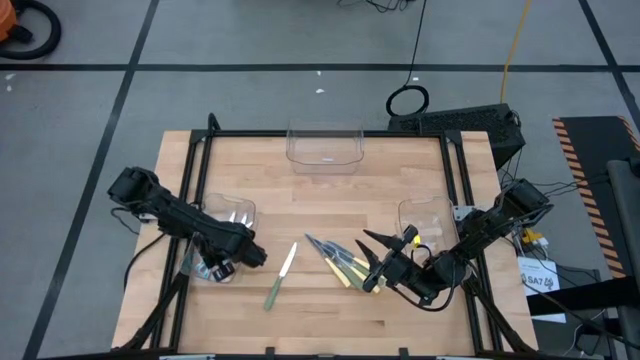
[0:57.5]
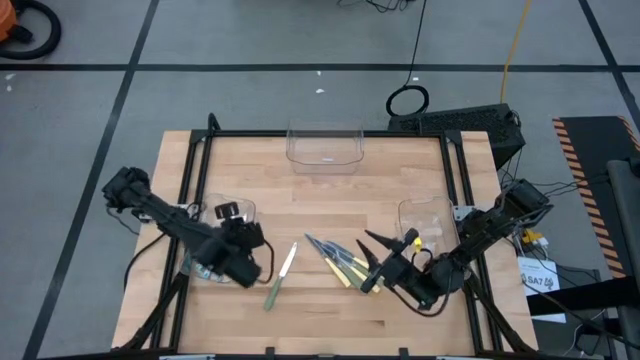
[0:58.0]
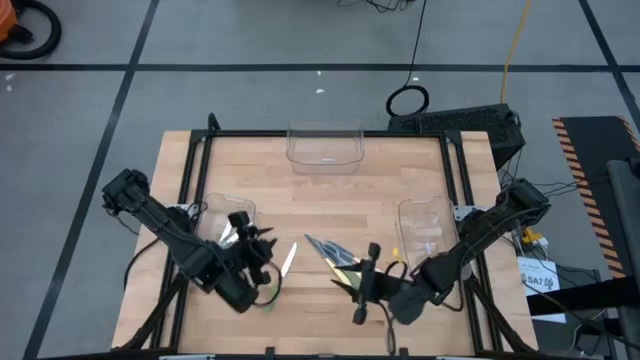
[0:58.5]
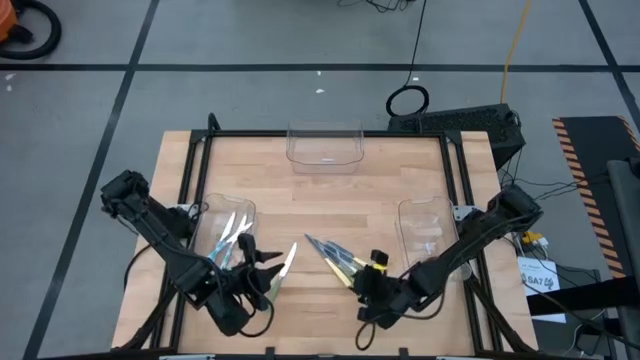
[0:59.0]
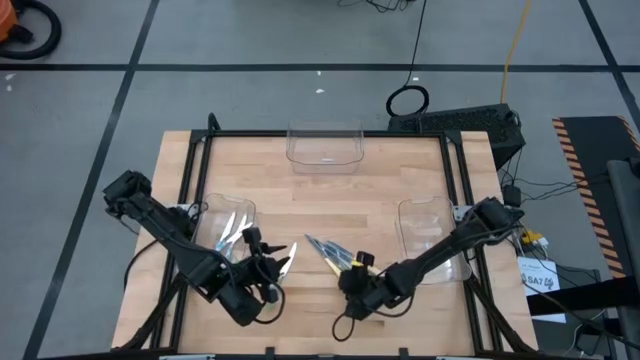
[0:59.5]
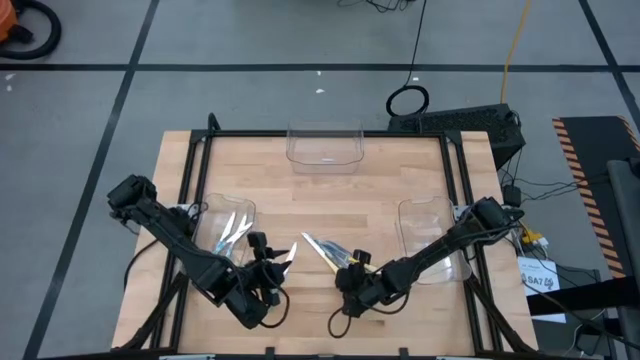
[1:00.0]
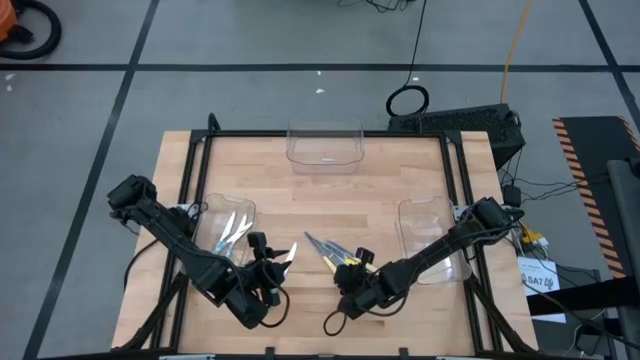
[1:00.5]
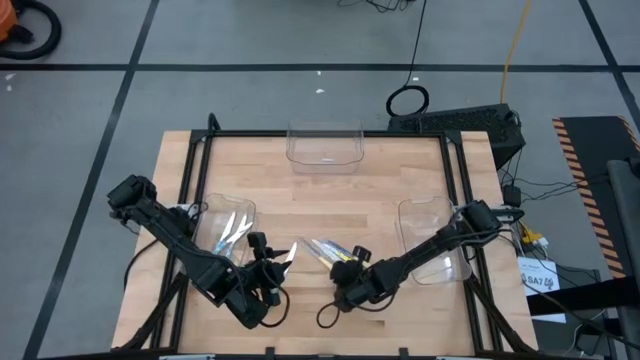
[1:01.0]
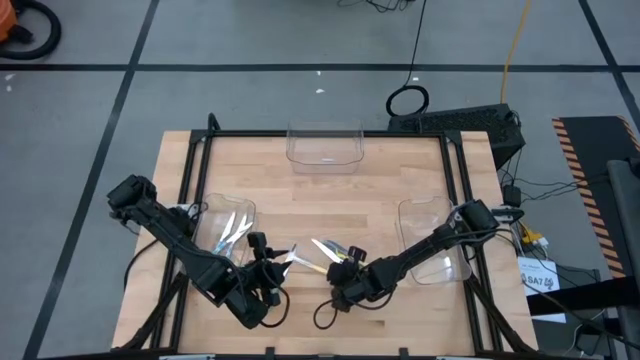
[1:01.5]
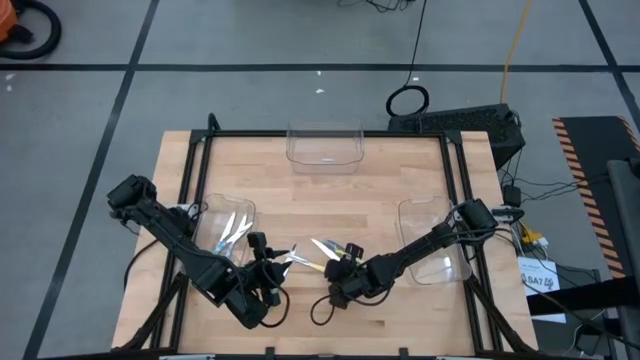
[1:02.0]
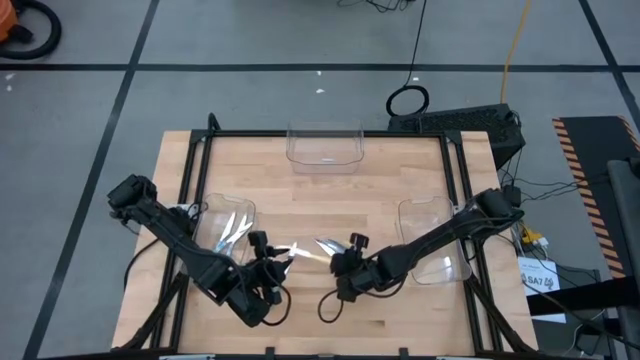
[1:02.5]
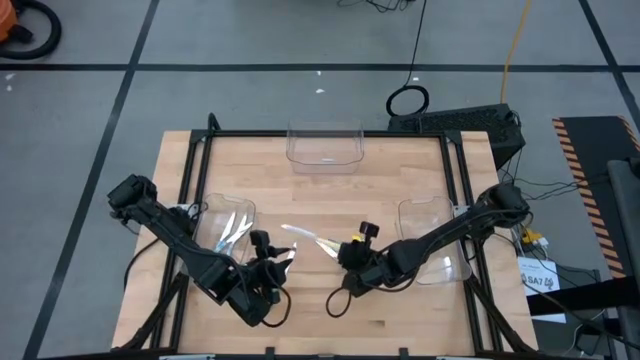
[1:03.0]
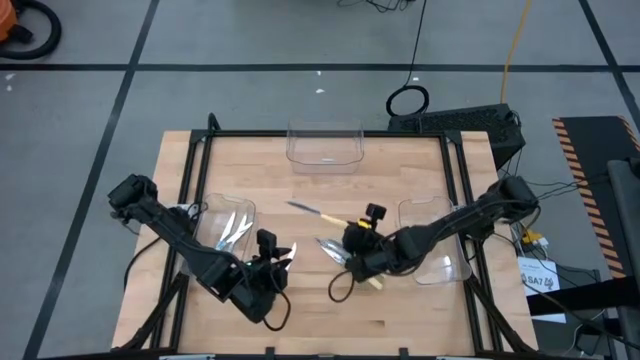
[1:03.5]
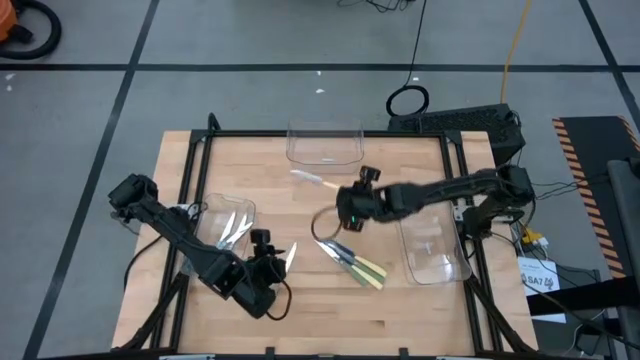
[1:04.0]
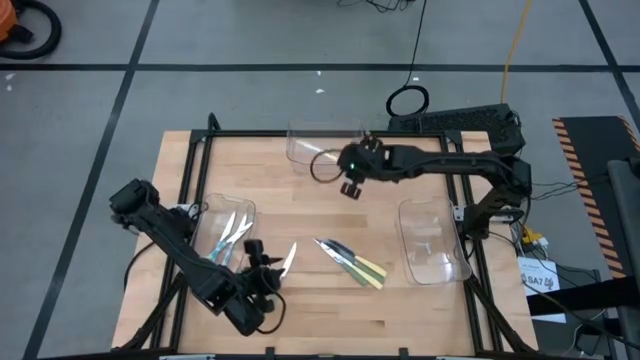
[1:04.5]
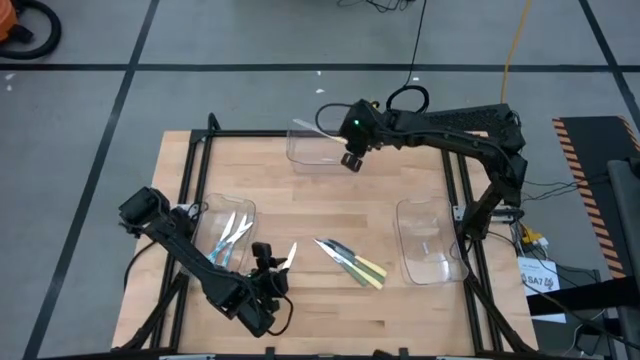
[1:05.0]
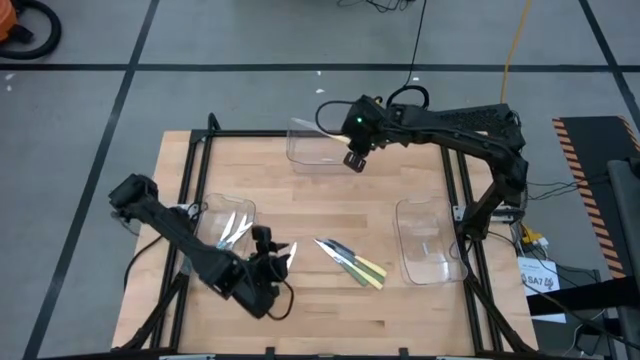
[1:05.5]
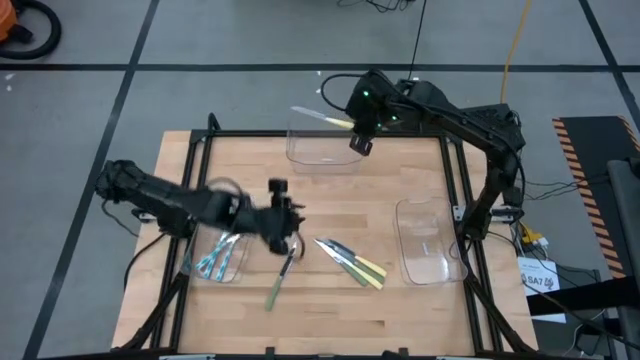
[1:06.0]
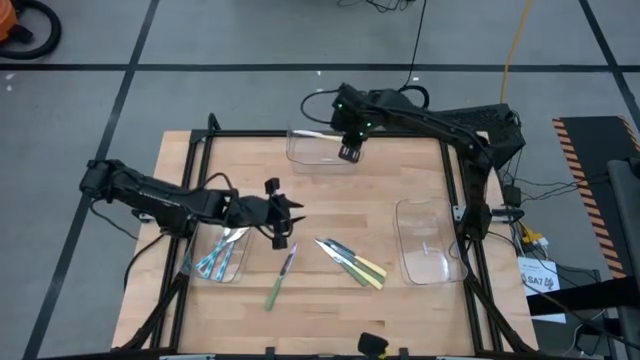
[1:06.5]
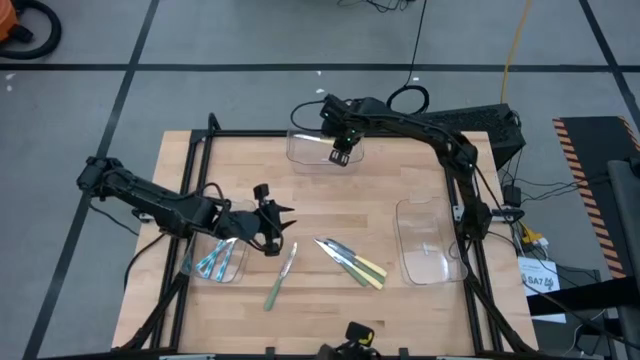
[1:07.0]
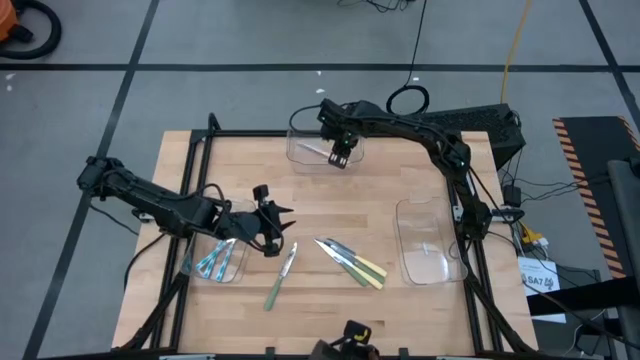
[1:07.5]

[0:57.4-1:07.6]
Task: Sort silverware by color (type)
Put the left yellow knife into the top center transparent bin

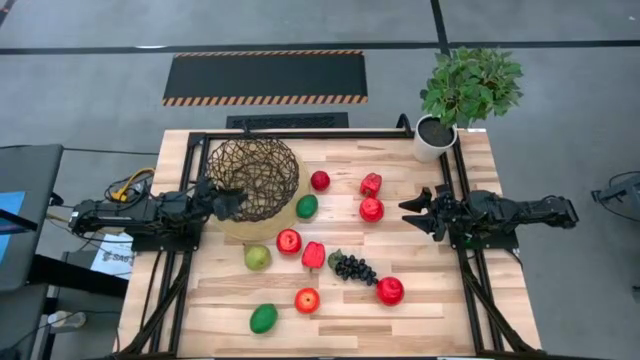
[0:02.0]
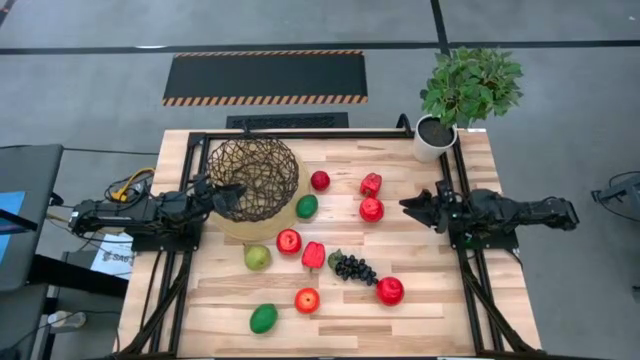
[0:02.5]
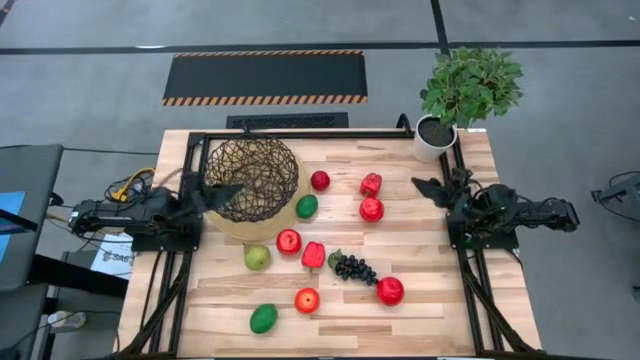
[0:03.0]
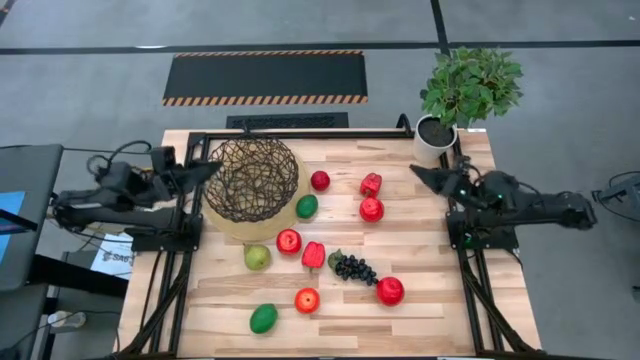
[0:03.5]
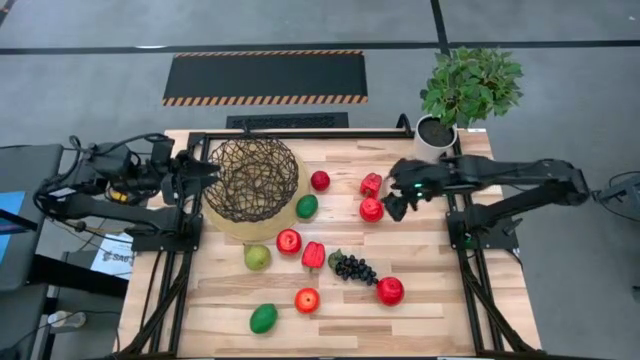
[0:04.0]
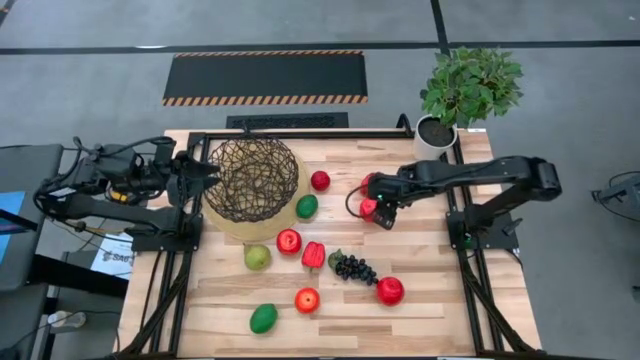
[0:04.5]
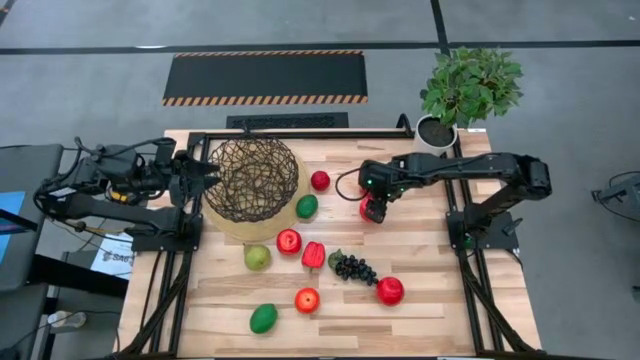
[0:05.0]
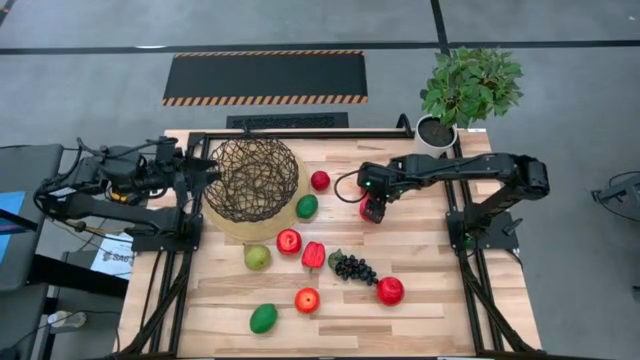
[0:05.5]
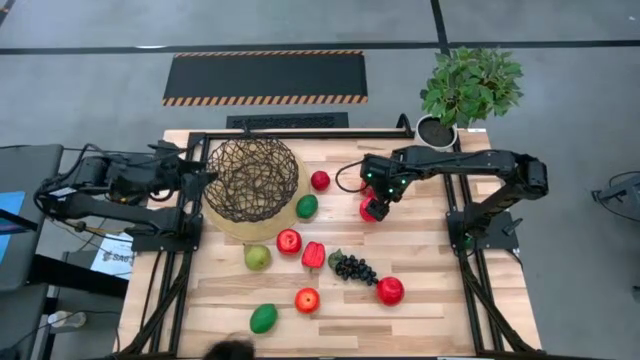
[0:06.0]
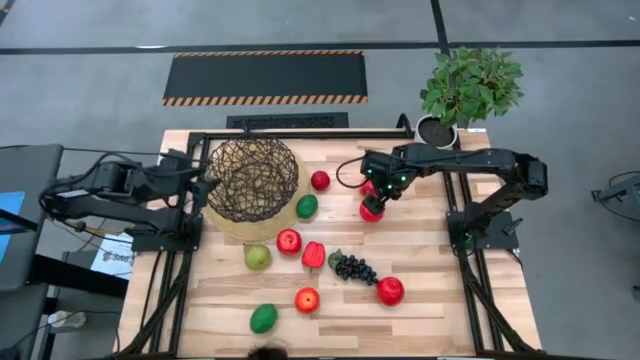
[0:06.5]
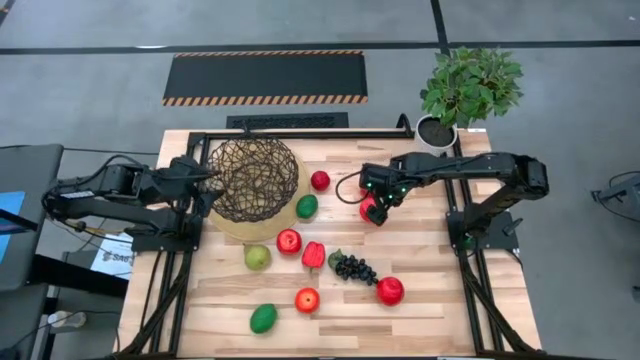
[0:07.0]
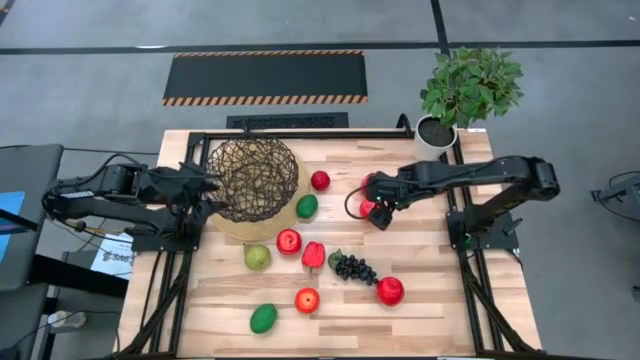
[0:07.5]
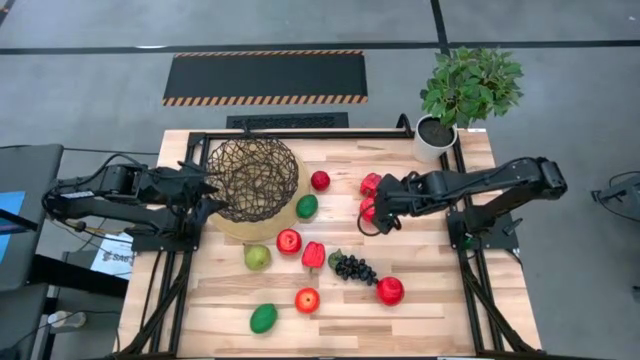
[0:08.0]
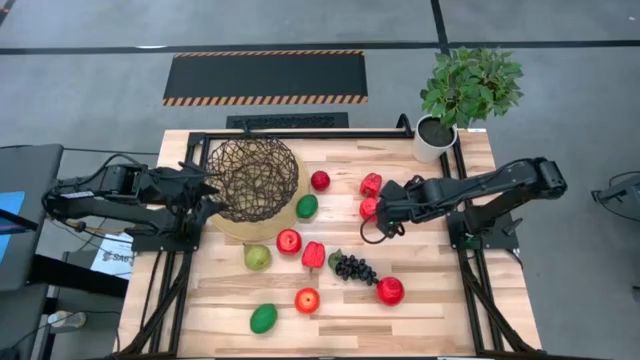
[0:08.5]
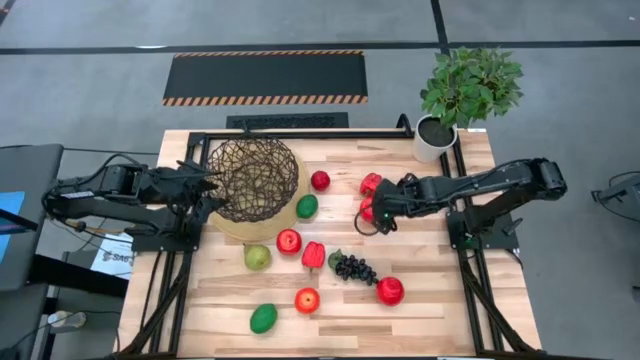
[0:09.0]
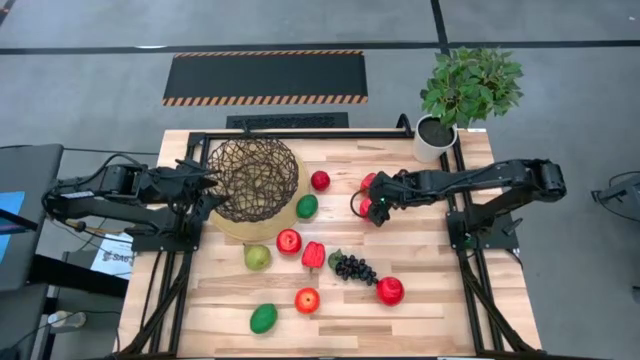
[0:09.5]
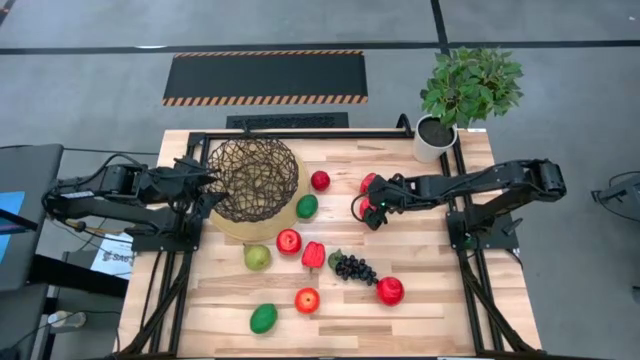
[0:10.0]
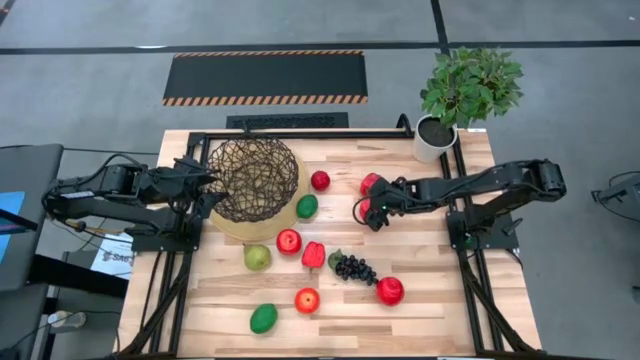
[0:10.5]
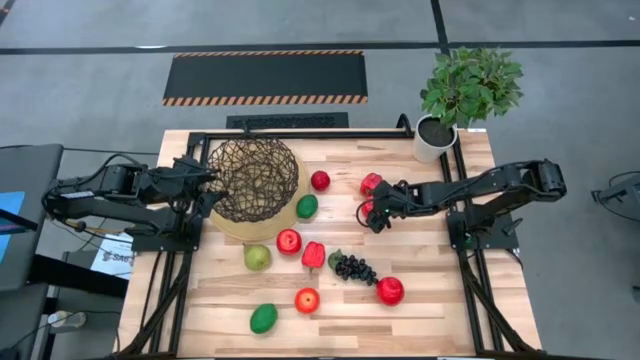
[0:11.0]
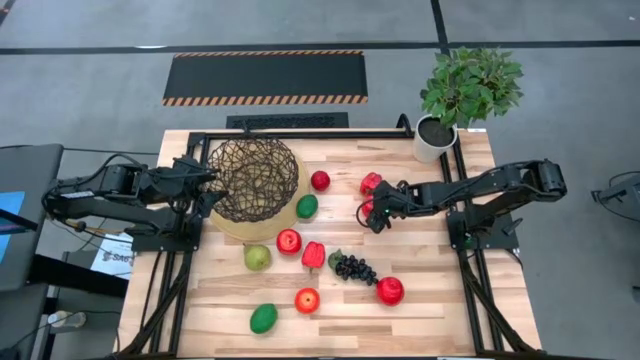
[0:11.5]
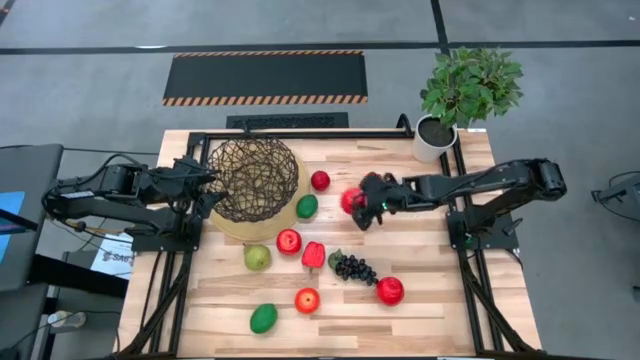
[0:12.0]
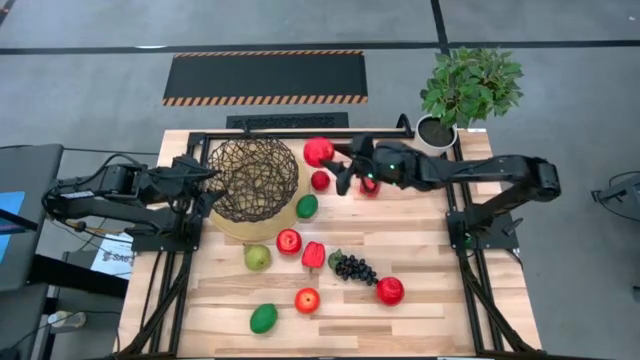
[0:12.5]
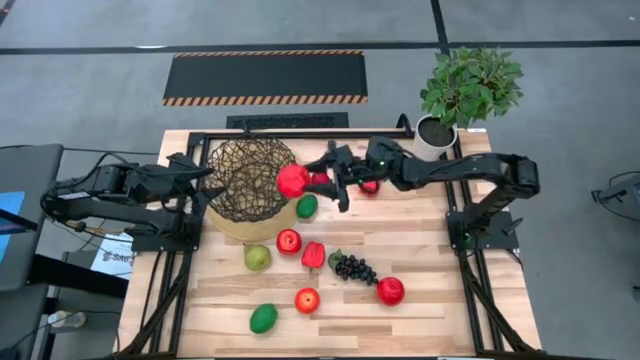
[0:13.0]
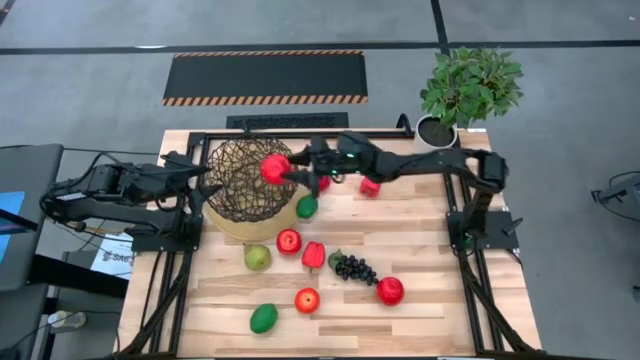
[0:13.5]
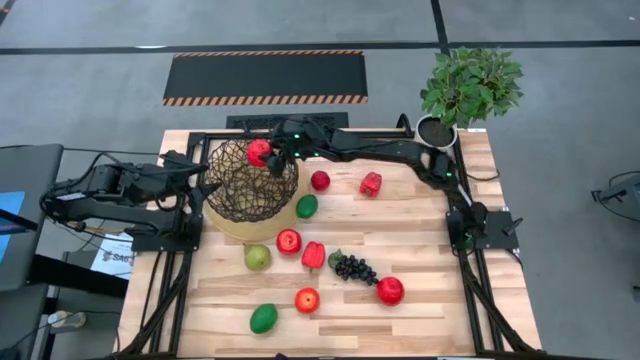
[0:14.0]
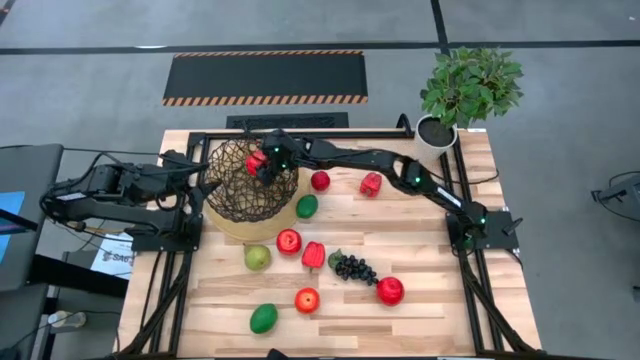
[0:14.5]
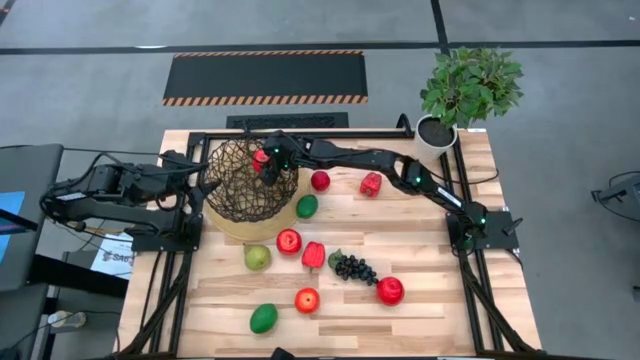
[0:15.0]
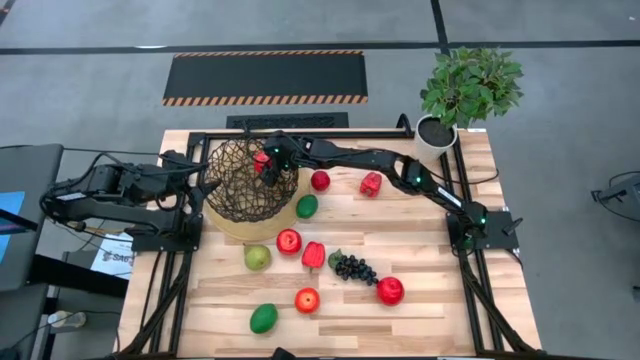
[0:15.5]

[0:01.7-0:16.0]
Task: Build produce basket
Put the red apple into the black wire basket
